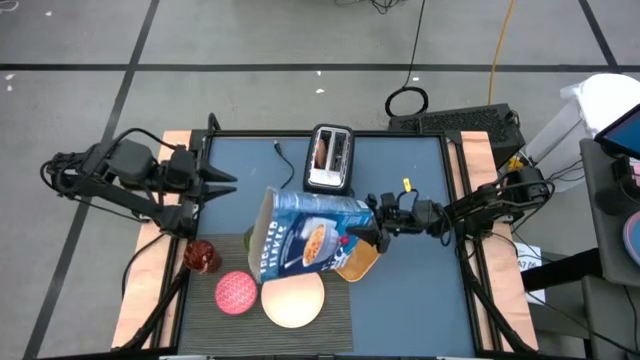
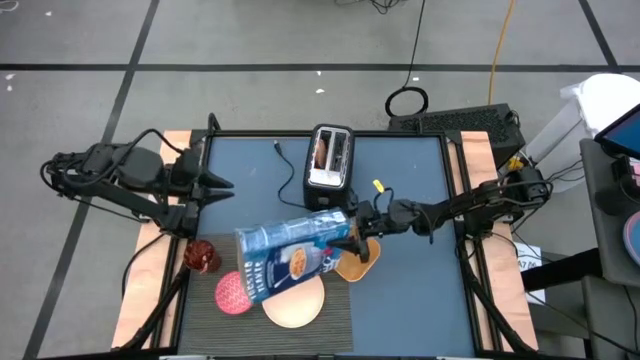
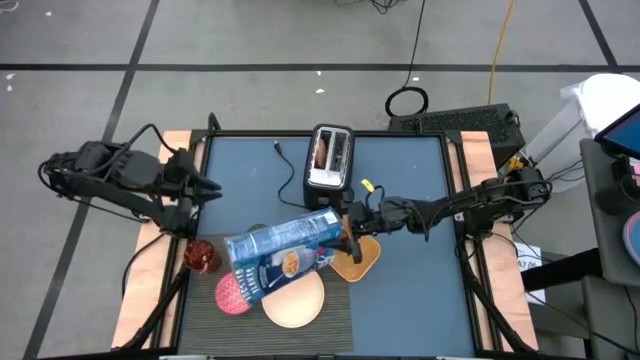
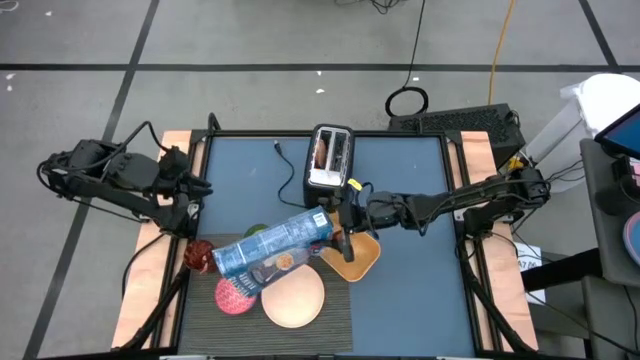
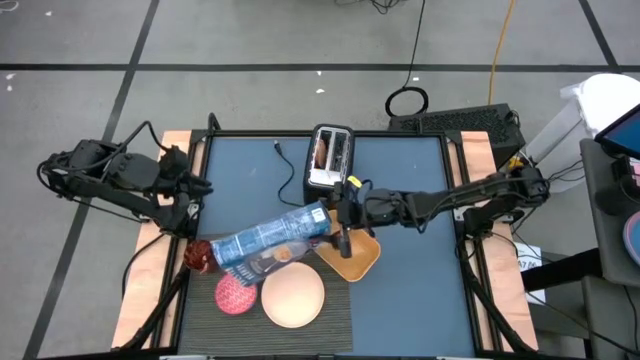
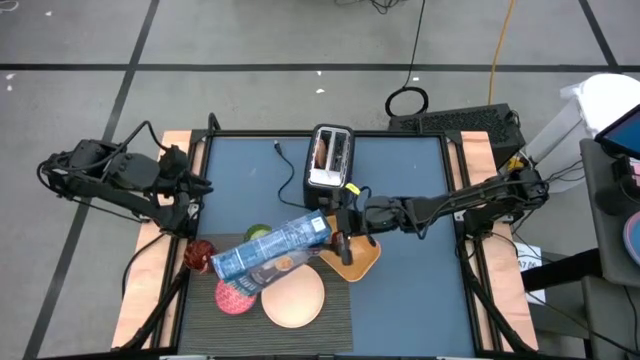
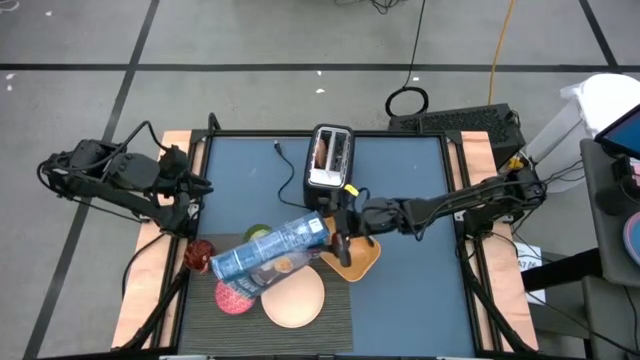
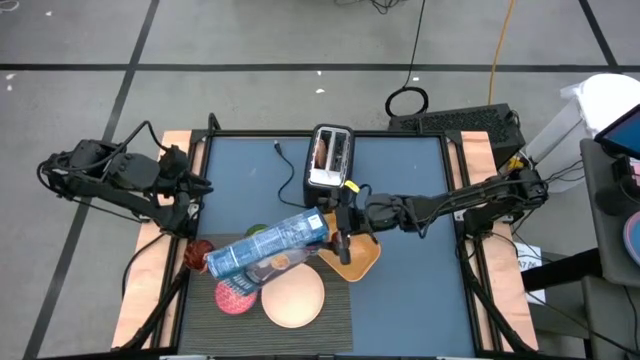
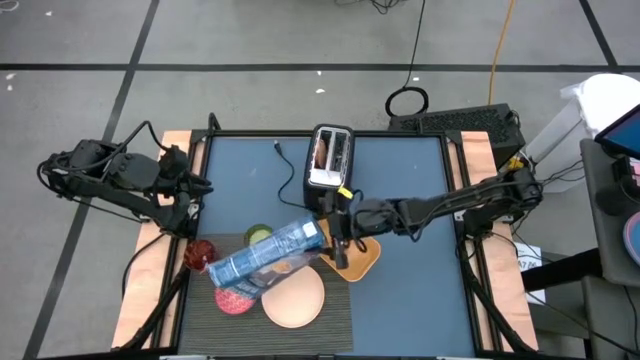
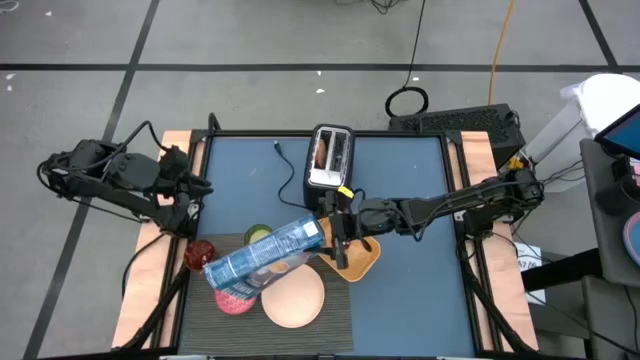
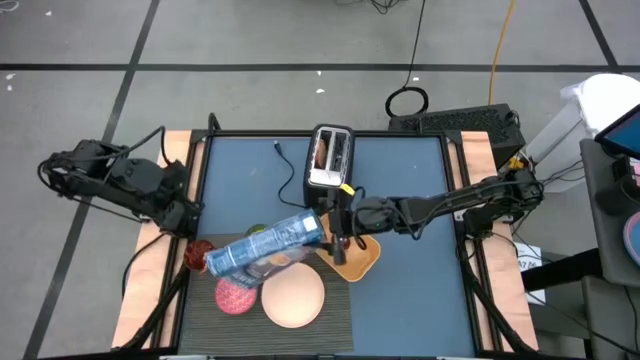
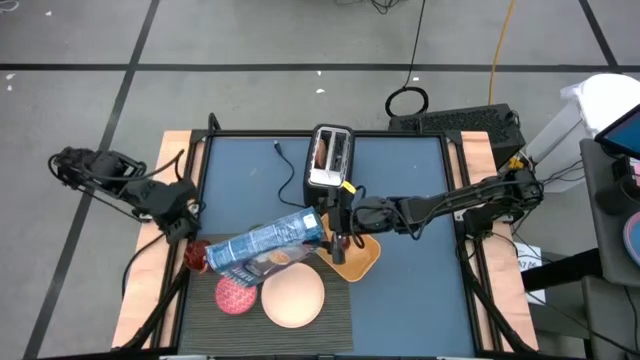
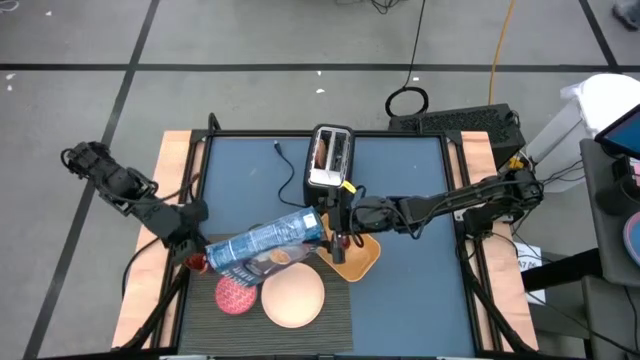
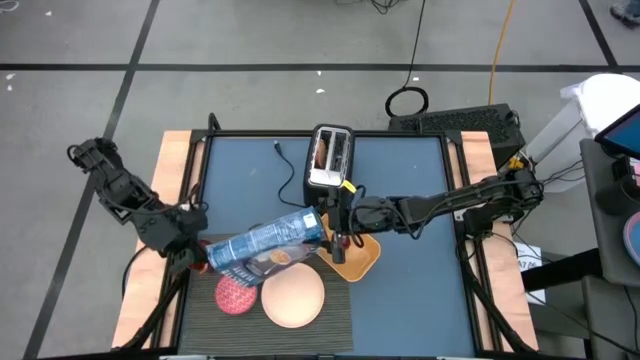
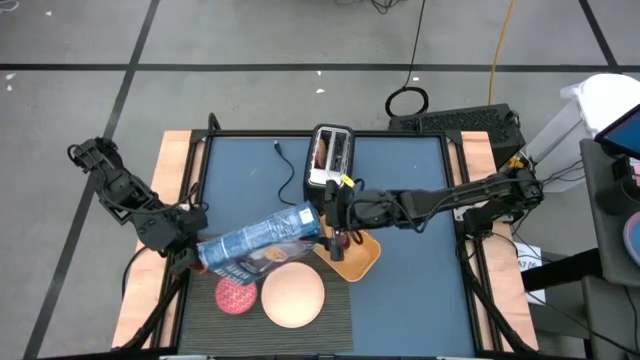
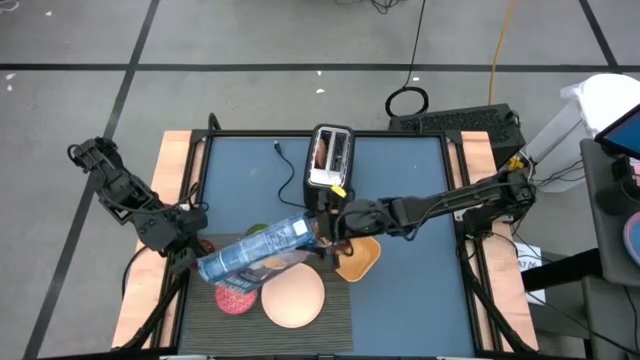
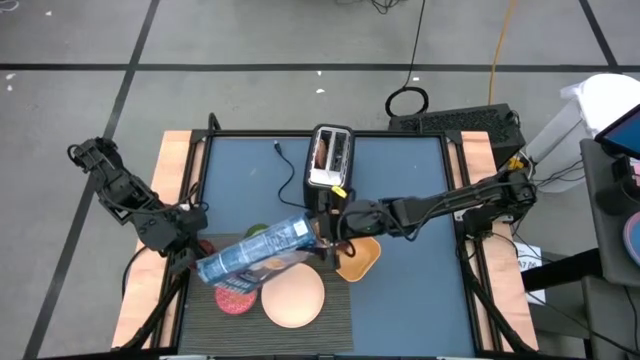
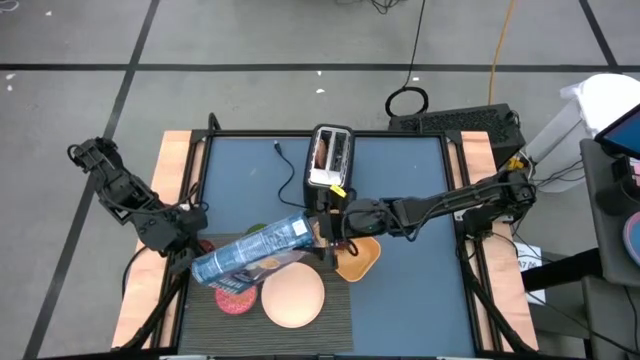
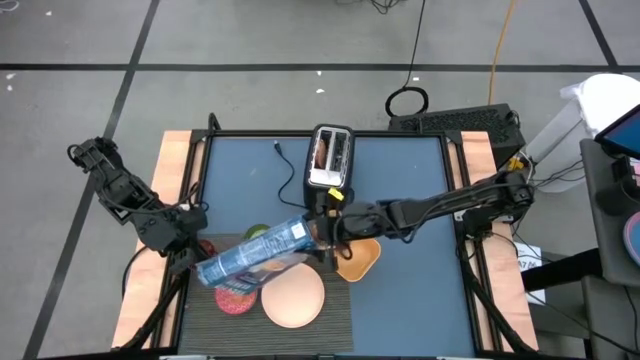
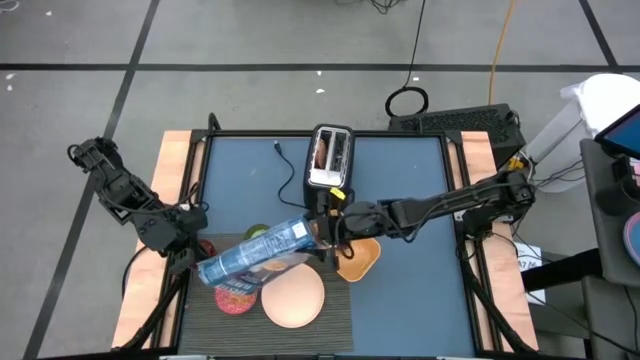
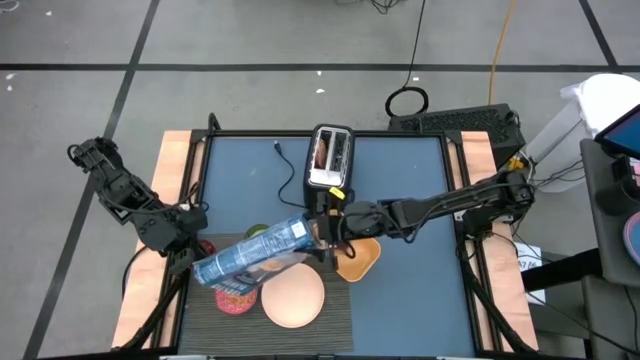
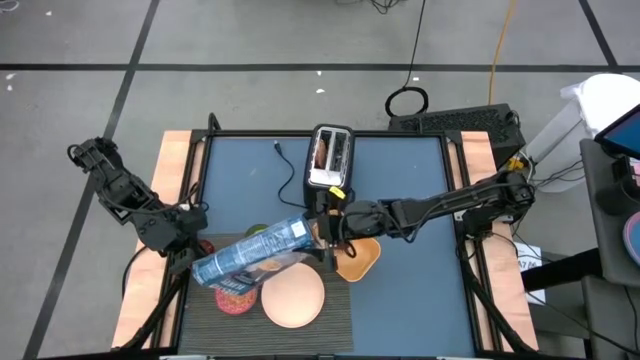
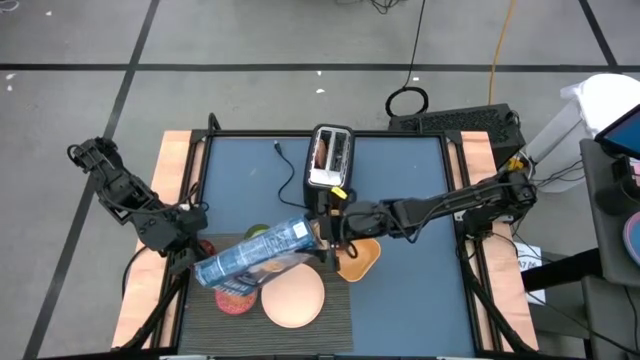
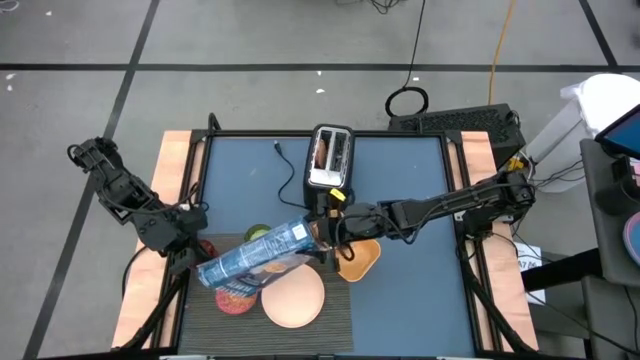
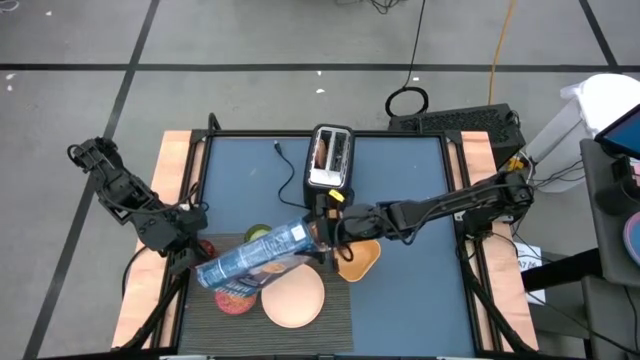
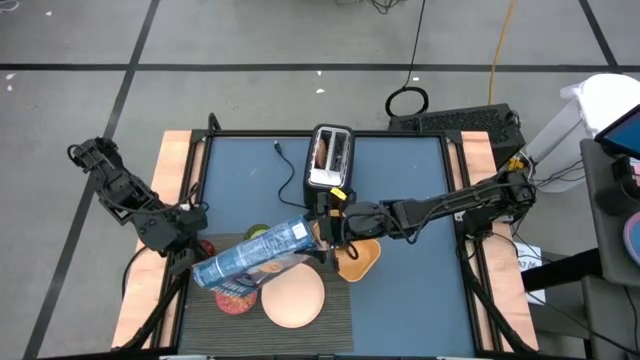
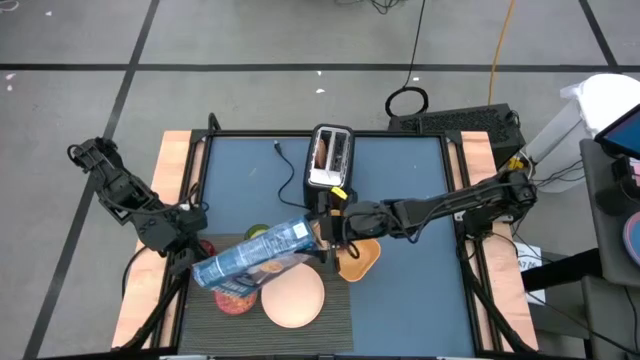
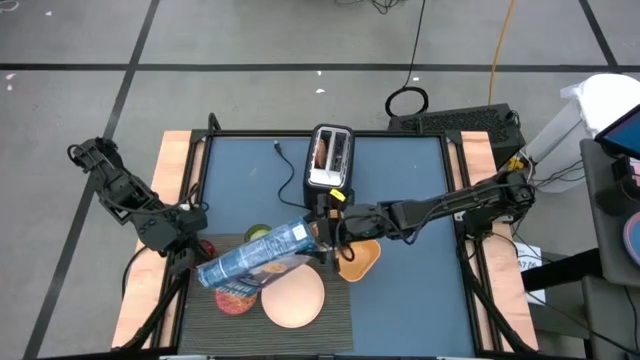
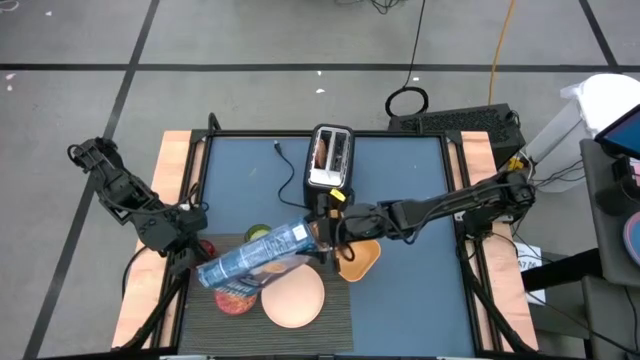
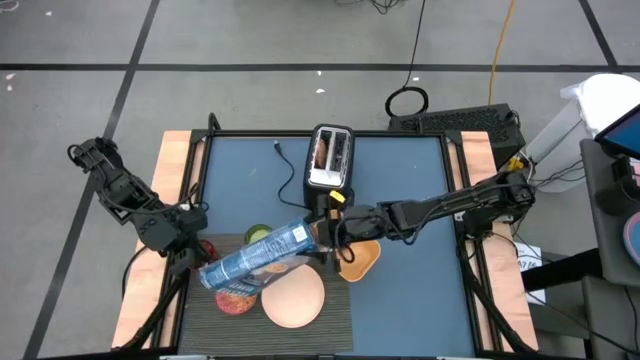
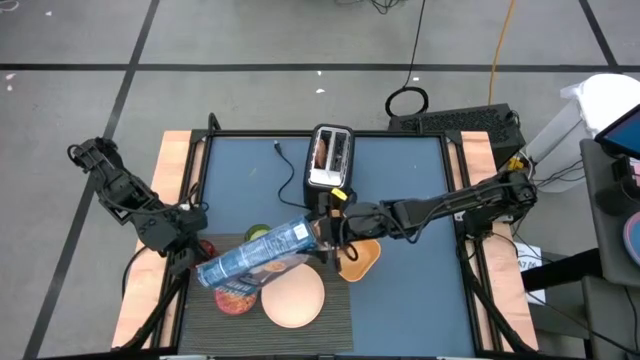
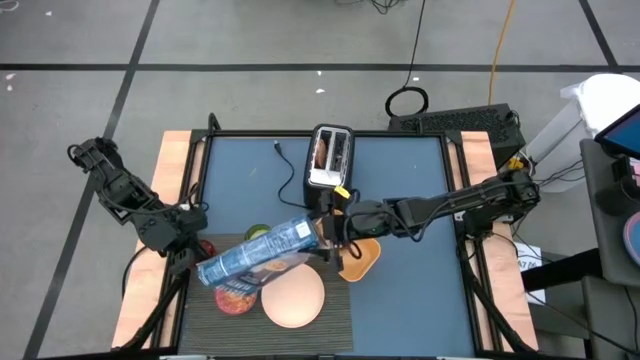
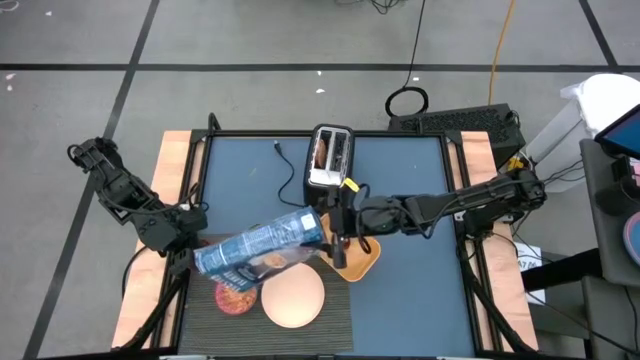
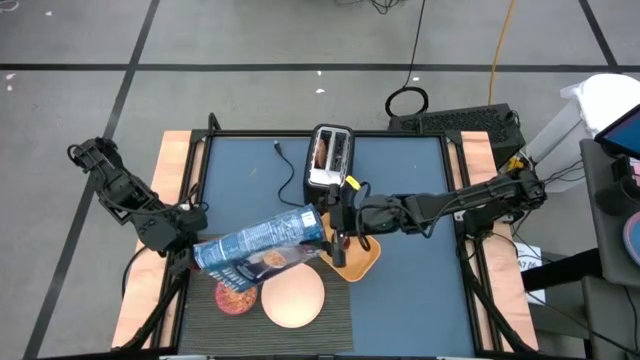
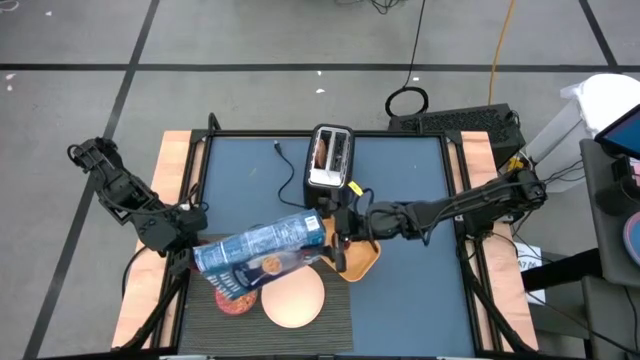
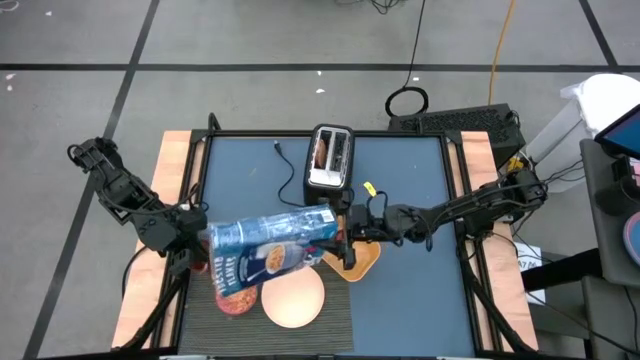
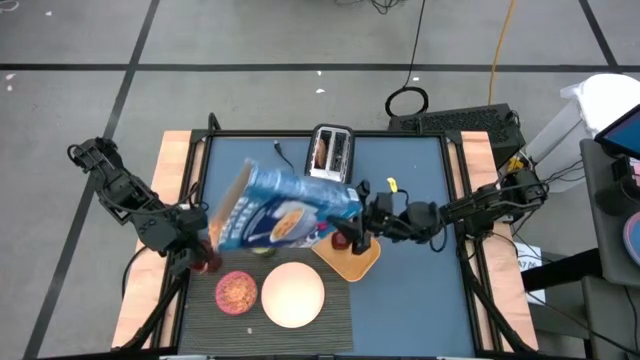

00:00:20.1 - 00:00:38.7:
Task: Arrange a breakfast setting
Pour the cereal from the blue cereal box into the red bowl

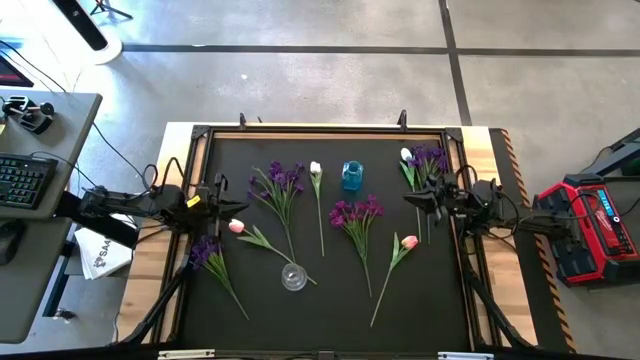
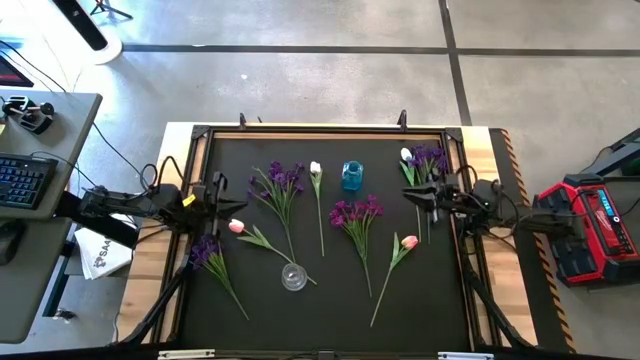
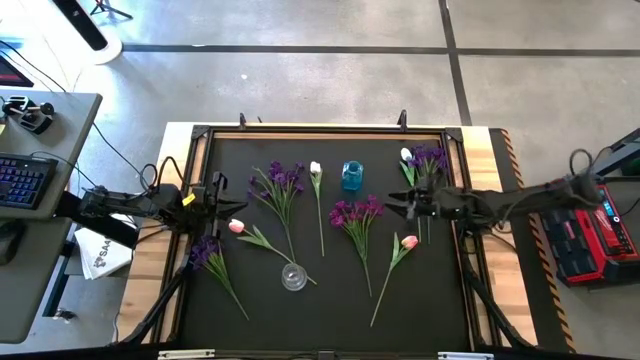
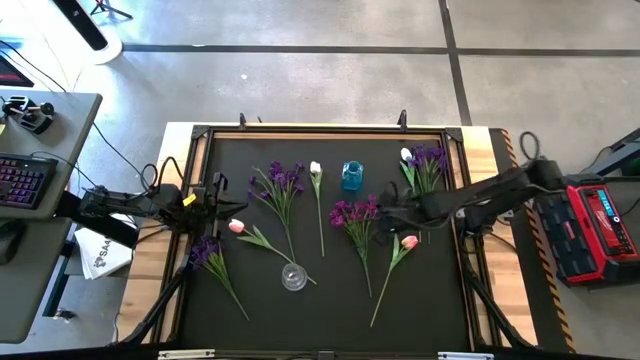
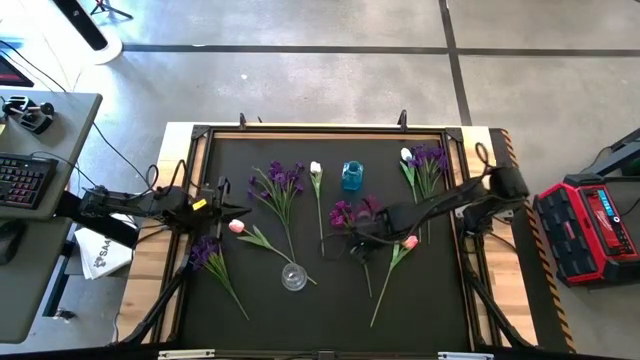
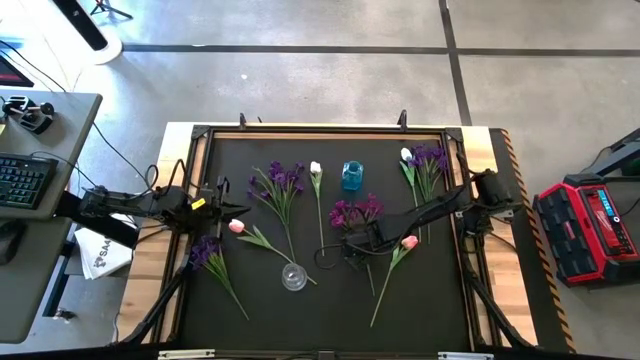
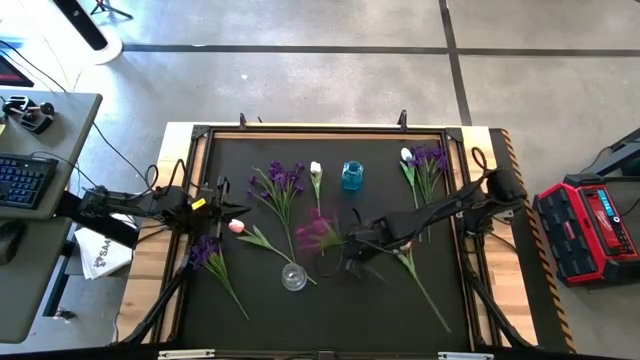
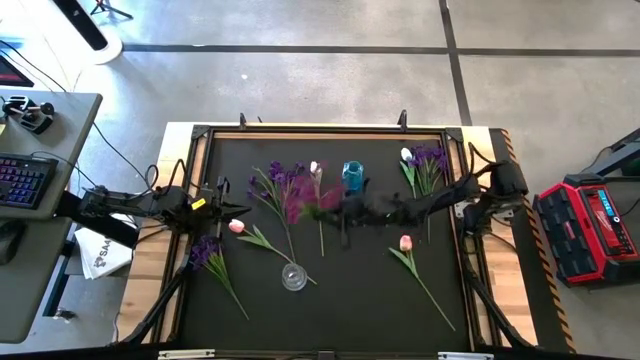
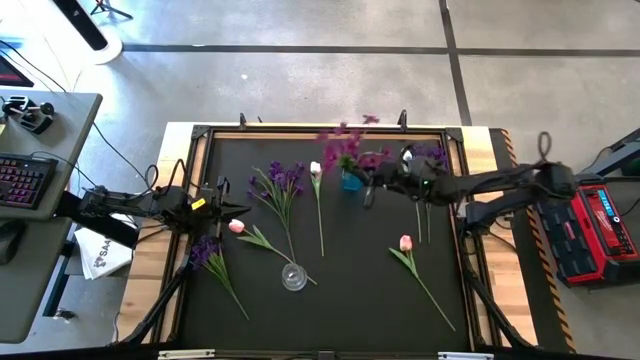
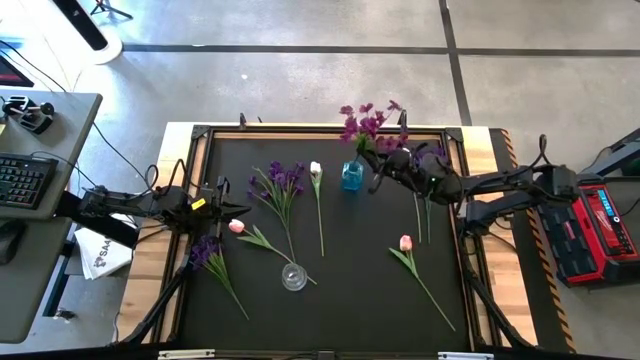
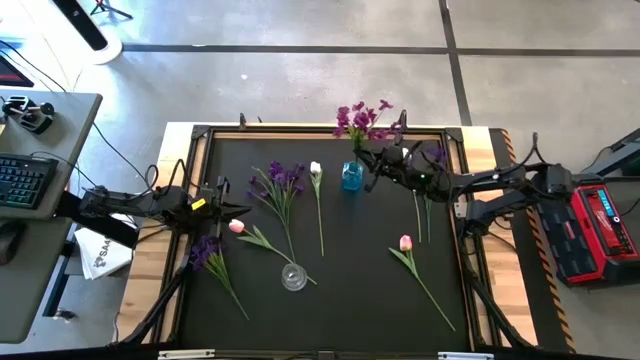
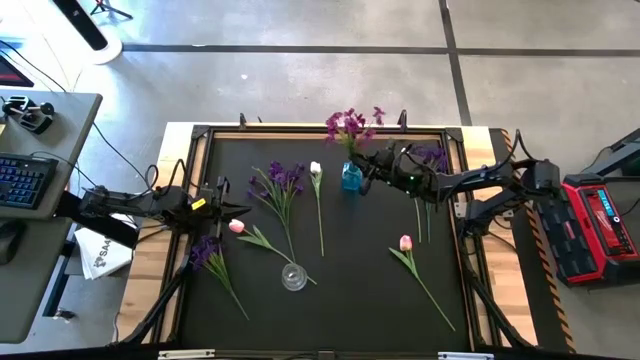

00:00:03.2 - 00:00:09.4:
Task: Sort flowers into vase by color
Put the violet flower into the blue vase
